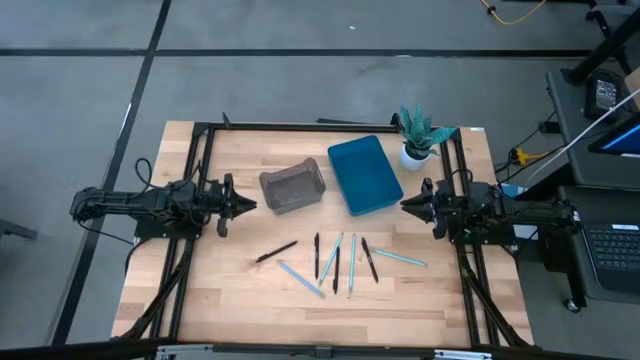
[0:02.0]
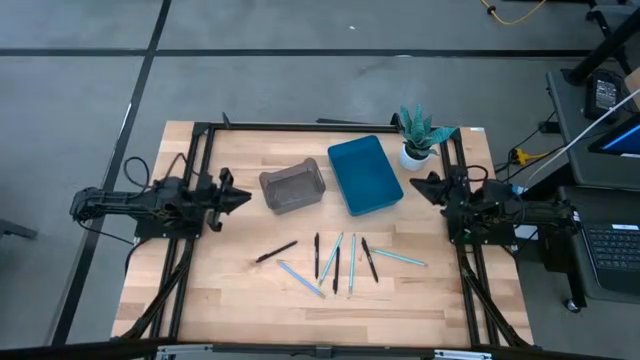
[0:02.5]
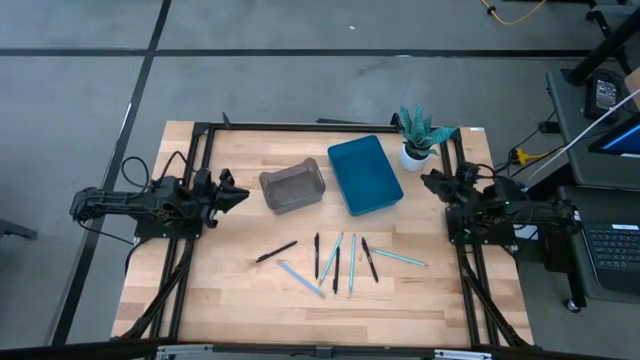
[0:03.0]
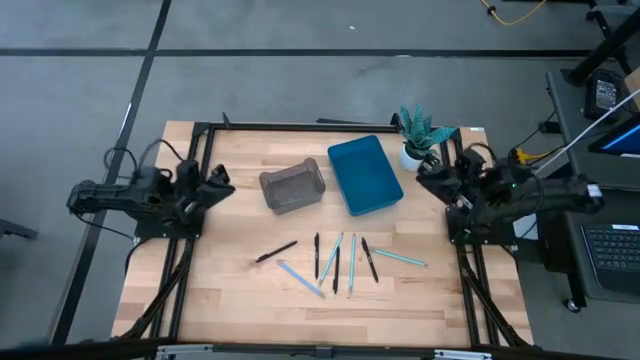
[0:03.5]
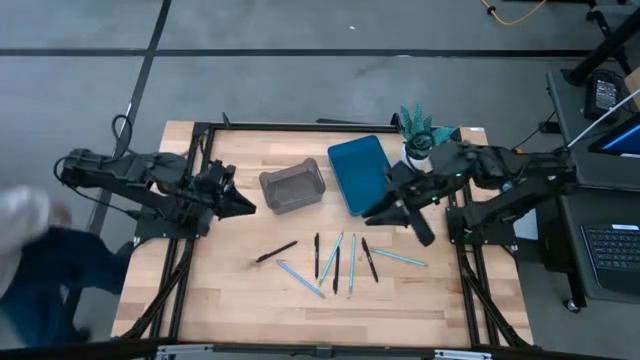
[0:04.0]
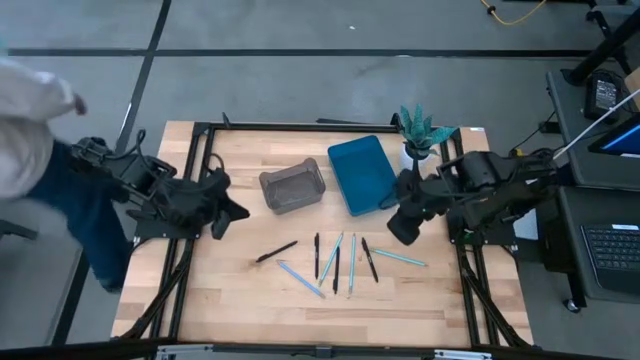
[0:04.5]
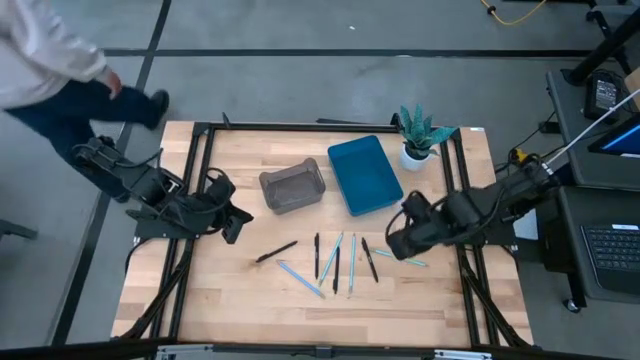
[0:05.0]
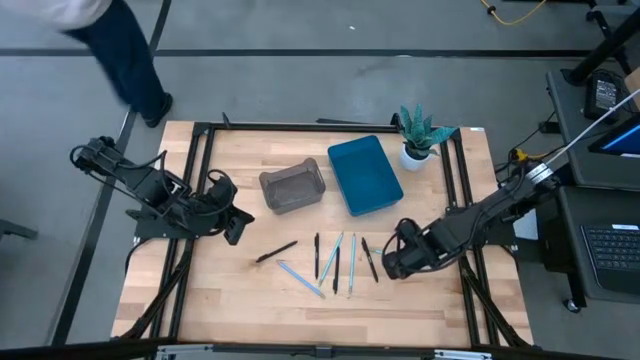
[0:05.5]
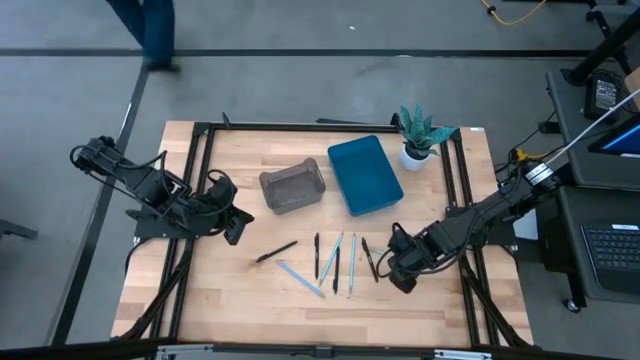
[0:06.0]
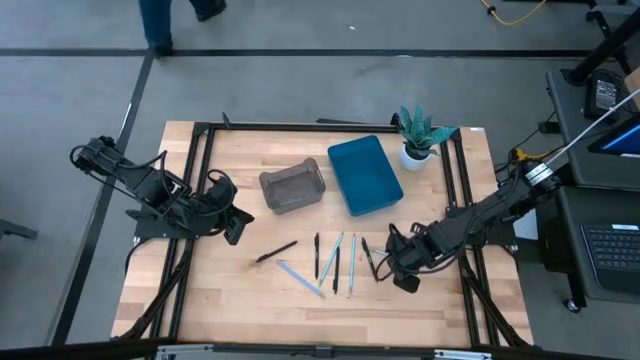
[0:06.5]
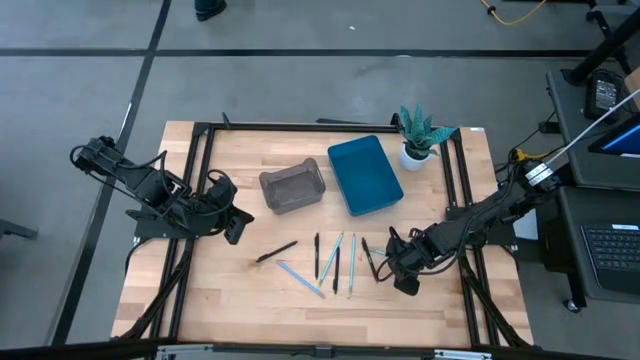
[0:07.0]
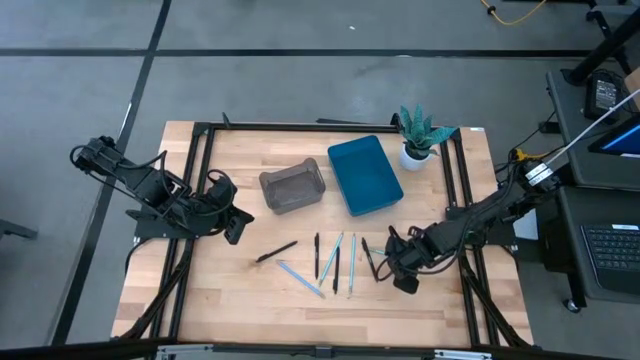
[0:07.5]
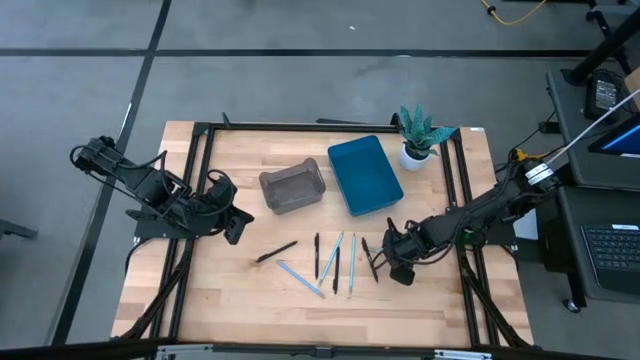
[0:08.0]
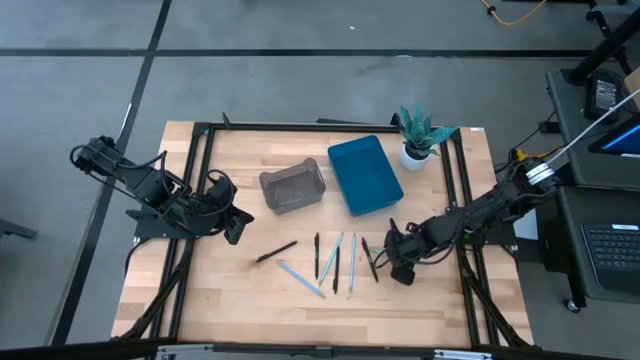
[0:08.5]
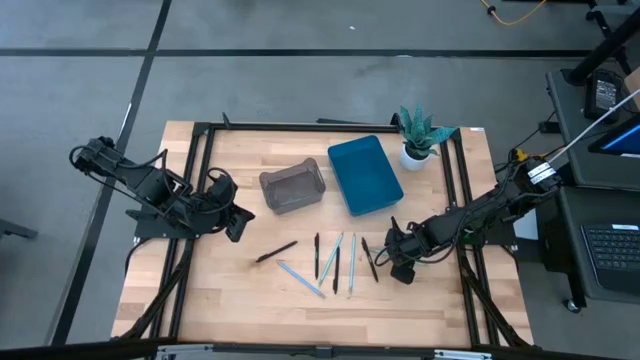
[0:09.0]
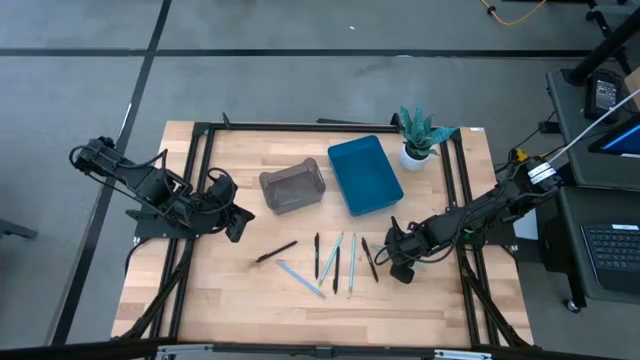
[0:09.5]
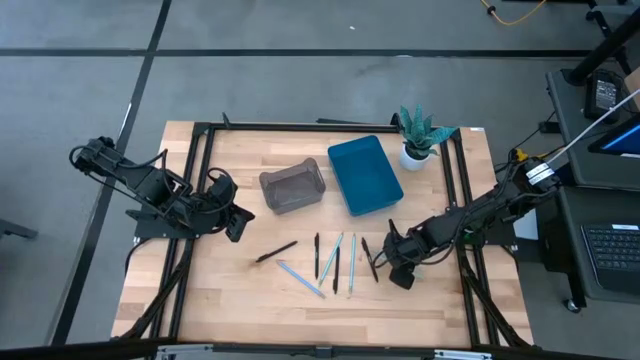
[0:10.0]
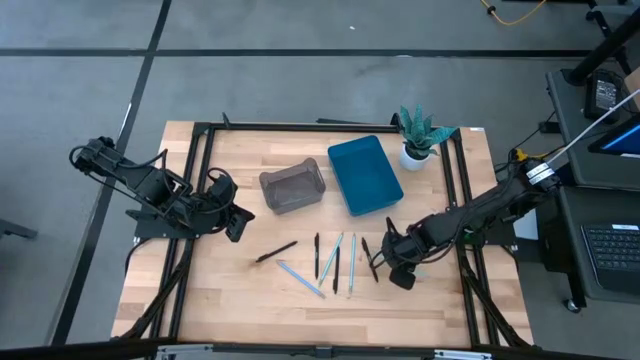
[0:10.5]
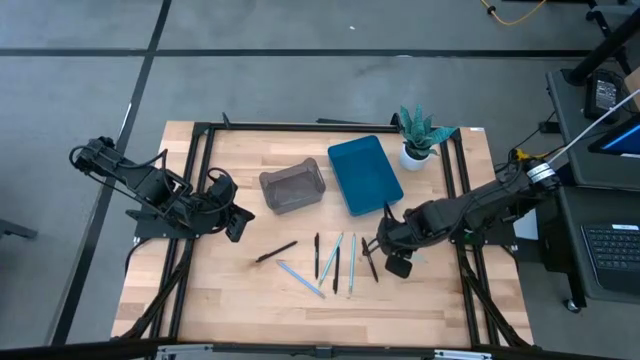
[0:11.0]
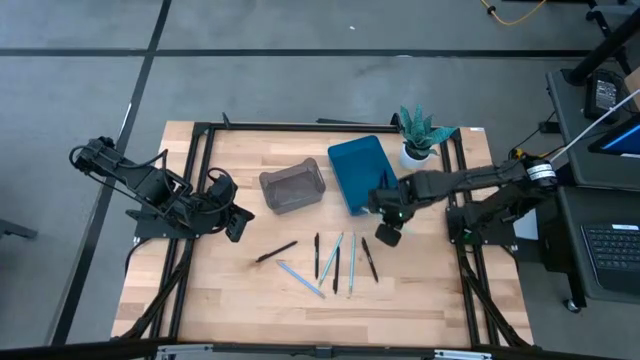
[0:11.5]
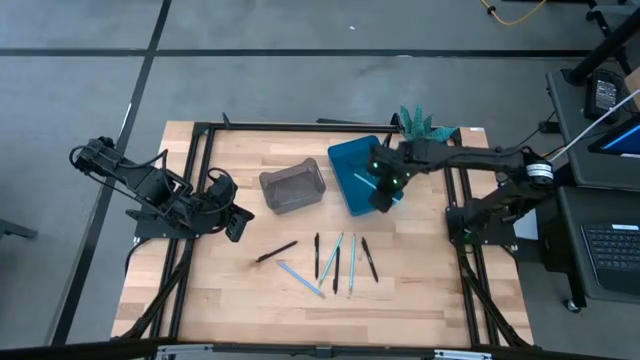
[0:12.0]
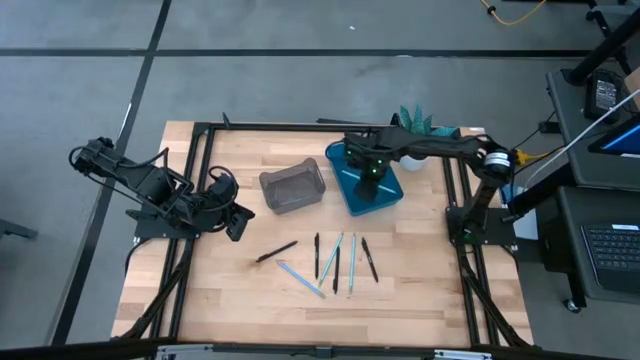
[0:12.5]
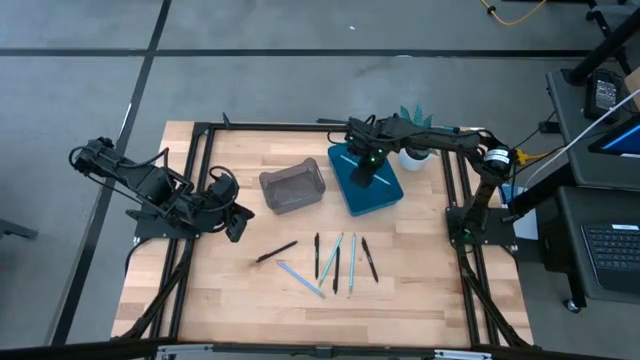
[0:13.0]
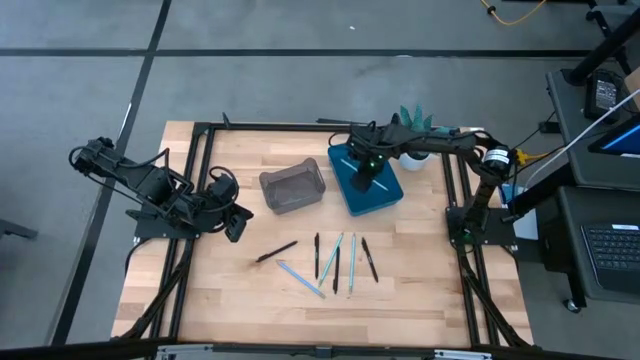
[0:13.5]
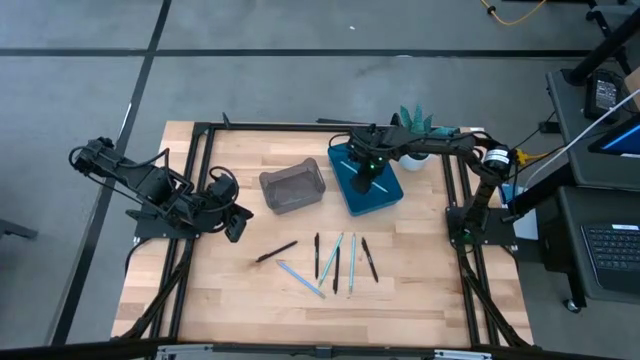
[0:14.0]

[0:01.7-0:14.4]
Task: Sort pens & pencils
Put the right light blue colored pencil into the blue bin

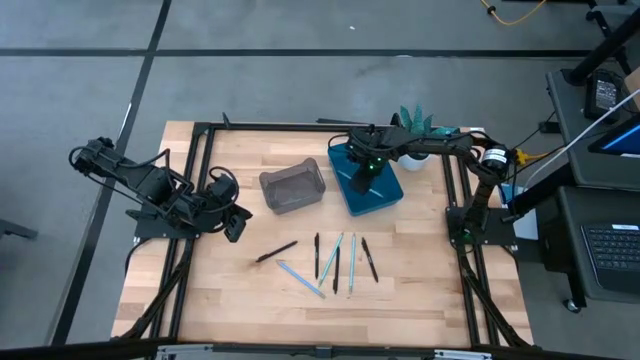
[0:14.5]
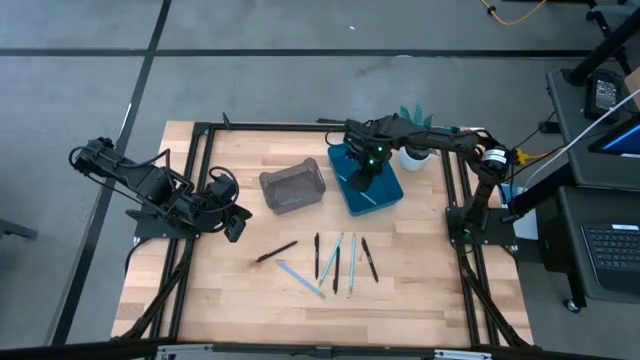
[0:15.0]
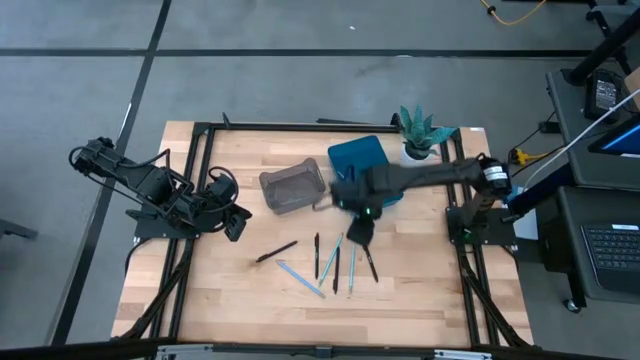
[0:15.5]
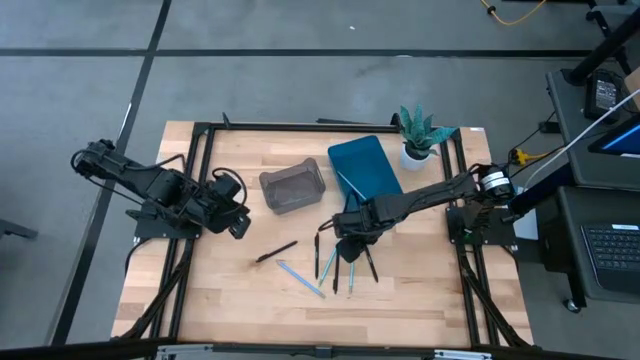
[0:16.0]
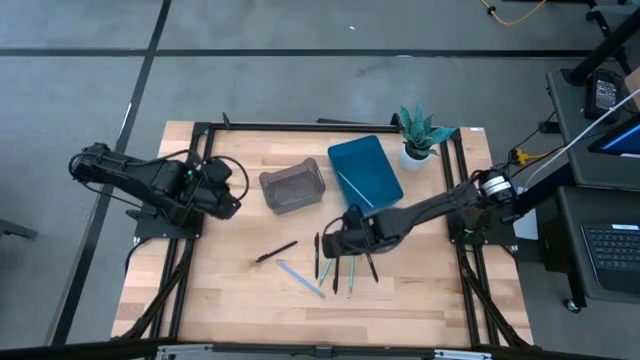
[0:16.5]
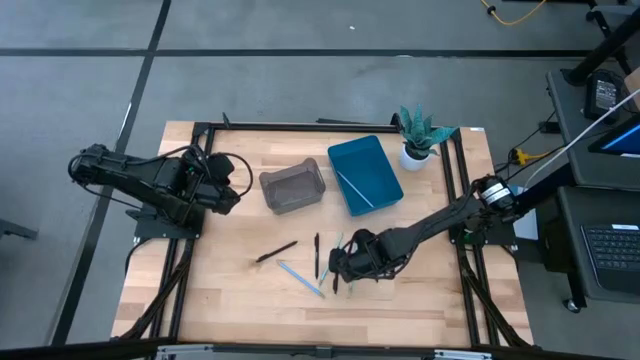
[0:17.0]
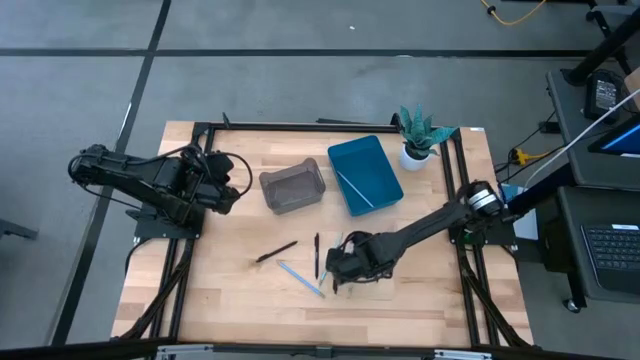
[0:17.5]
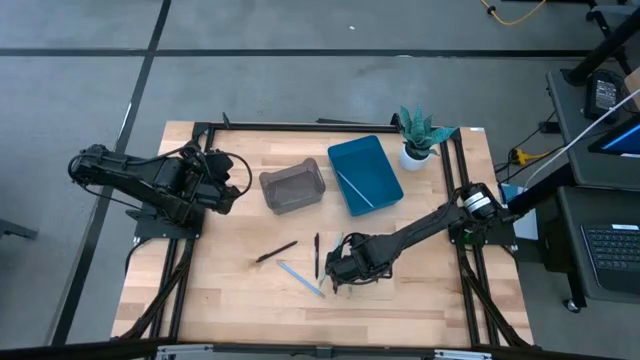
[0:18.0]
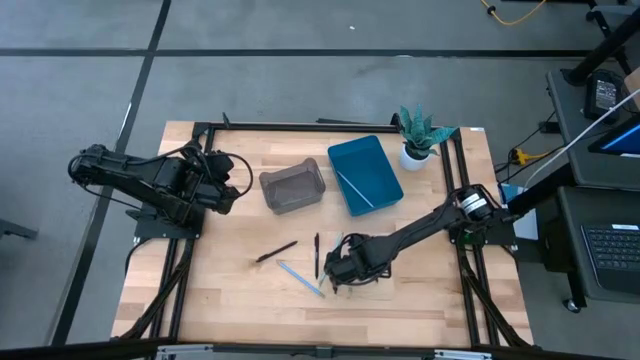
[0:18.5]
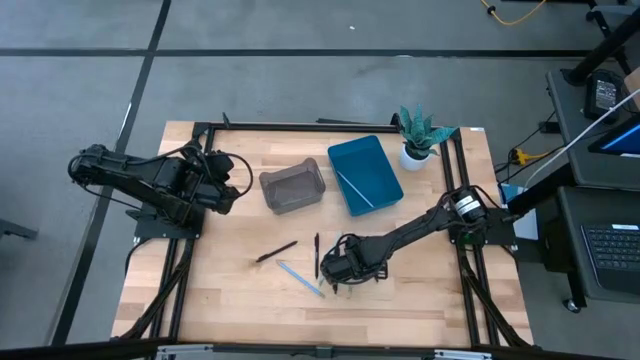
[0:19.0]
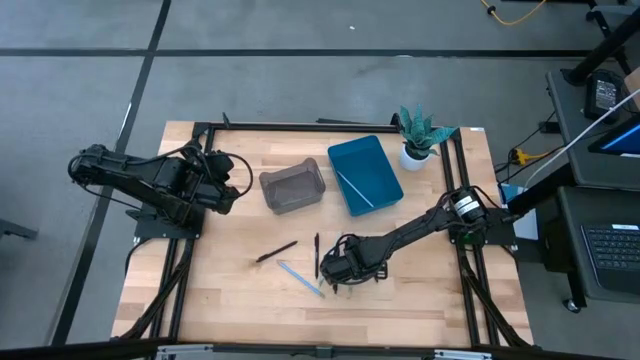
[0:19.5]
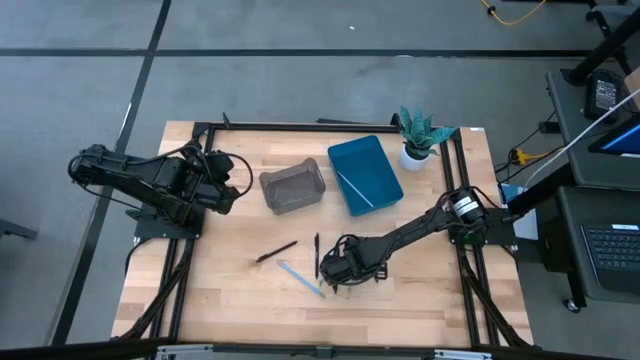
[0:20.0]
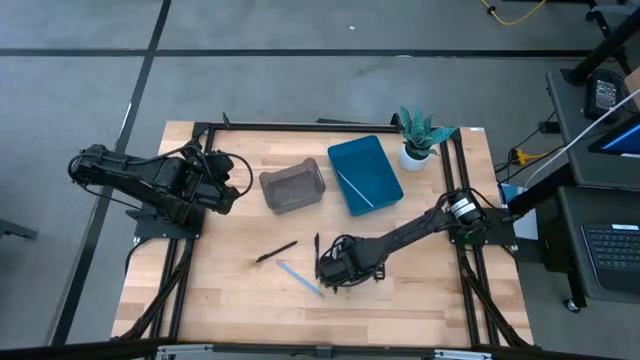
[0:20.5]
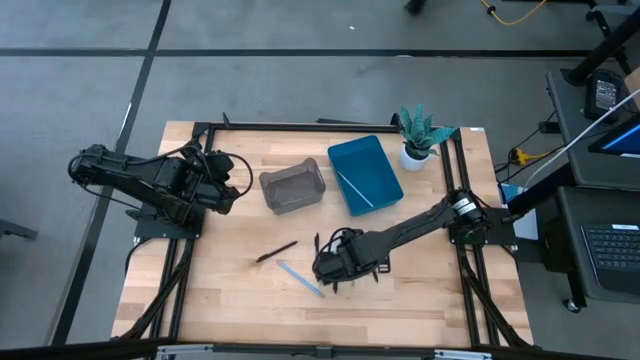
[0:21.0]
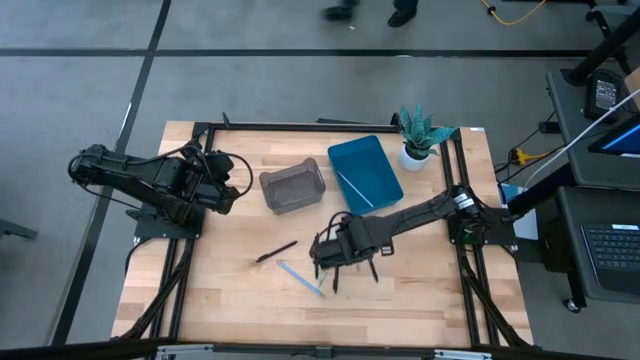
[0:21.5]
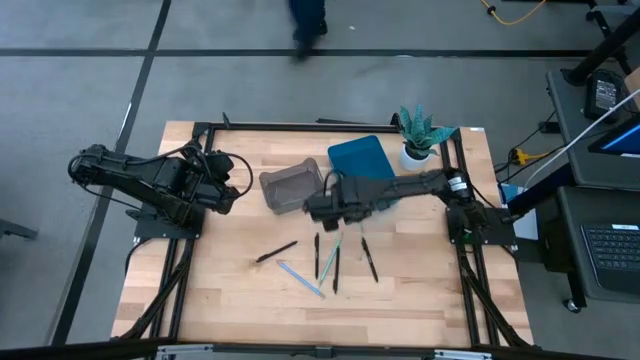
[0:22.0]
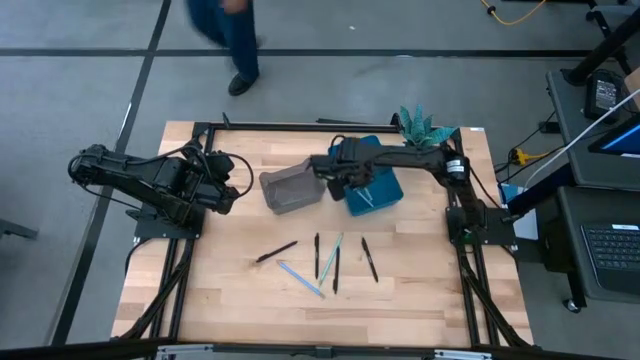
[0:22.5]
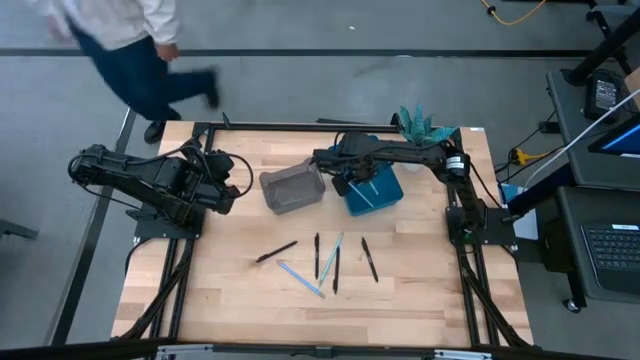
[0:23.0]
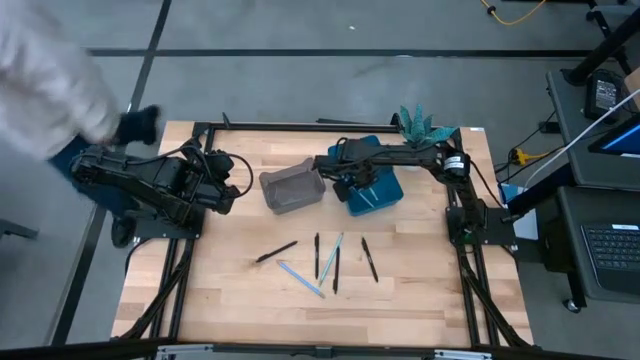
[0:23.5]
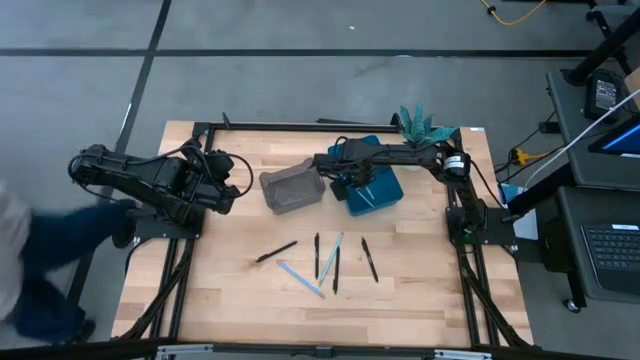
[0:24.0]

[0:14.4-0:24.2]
Put the right light blue colored pencil into the blue bin
